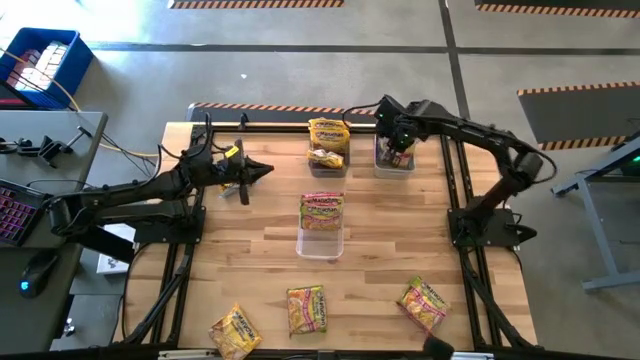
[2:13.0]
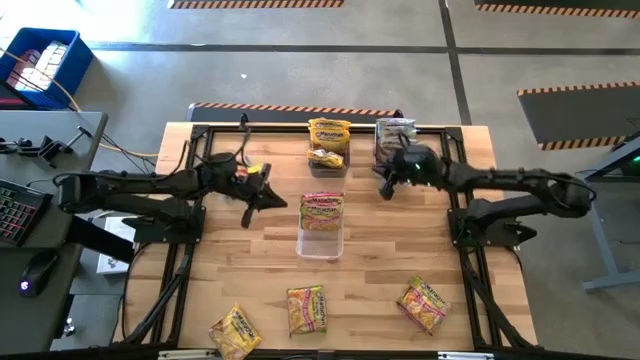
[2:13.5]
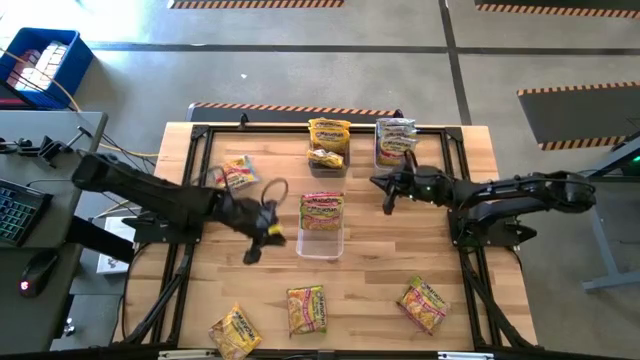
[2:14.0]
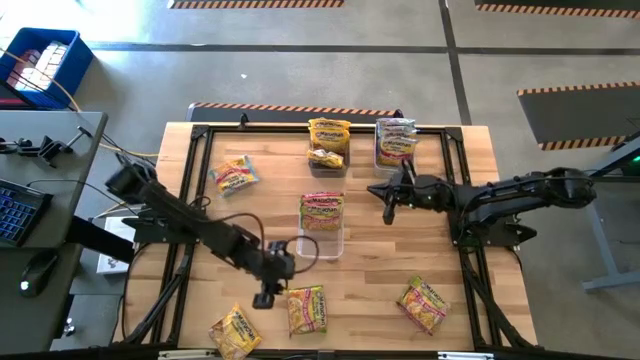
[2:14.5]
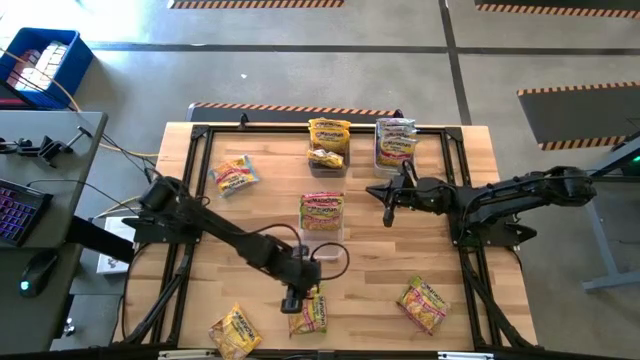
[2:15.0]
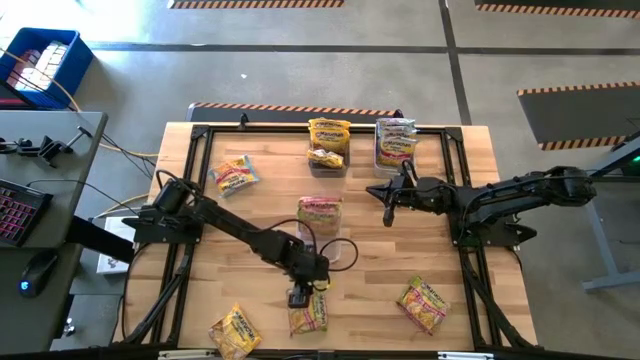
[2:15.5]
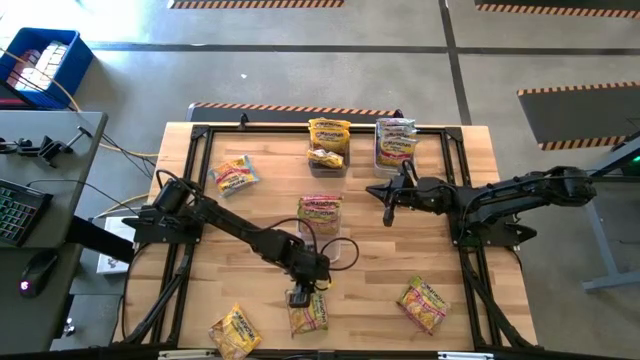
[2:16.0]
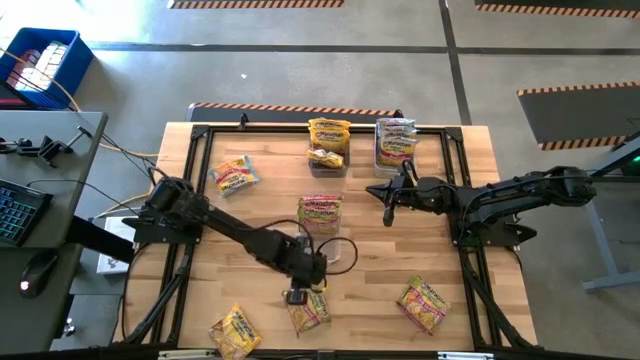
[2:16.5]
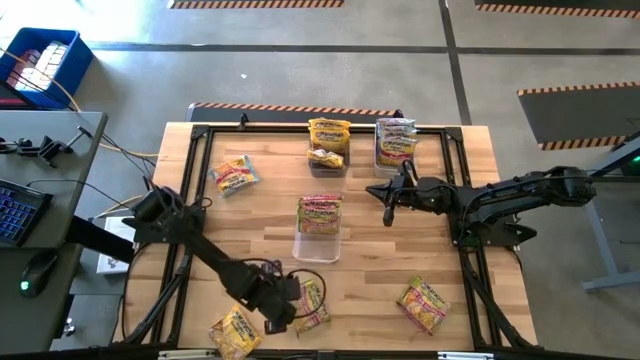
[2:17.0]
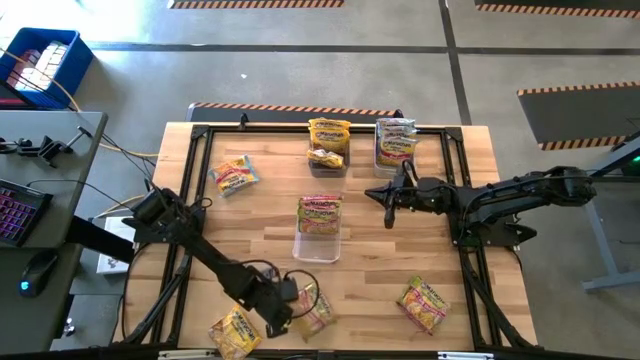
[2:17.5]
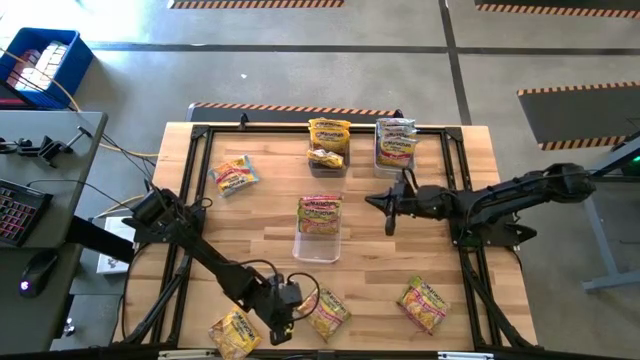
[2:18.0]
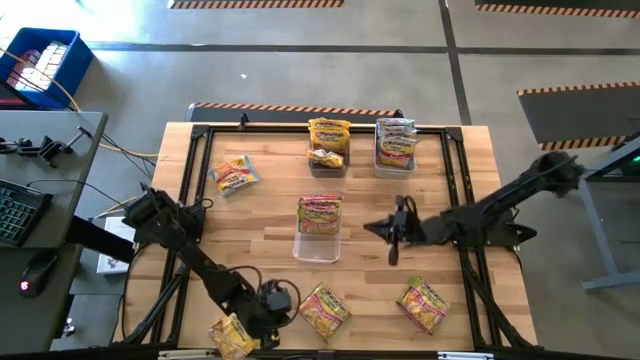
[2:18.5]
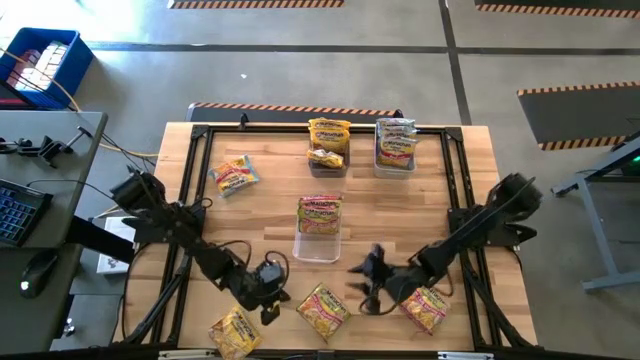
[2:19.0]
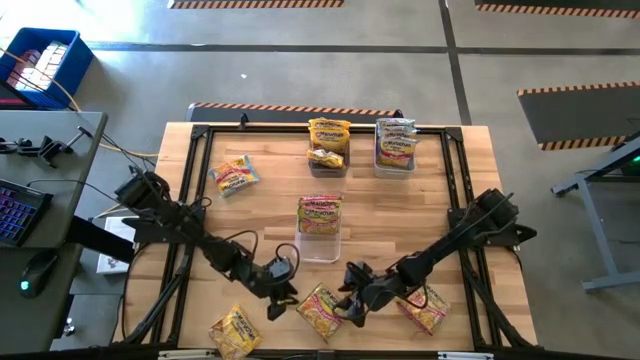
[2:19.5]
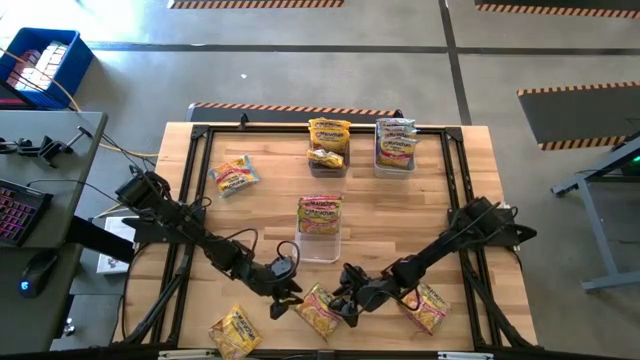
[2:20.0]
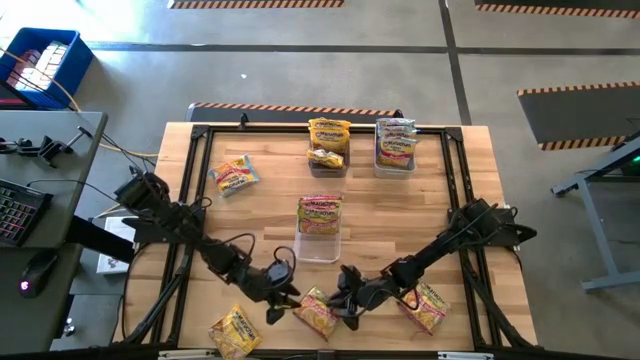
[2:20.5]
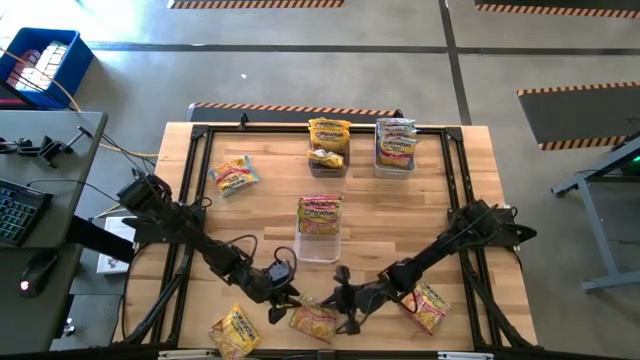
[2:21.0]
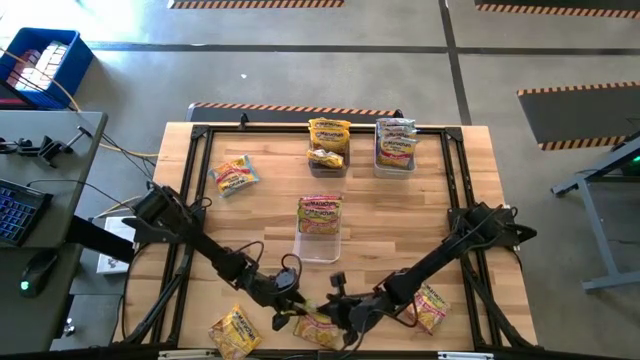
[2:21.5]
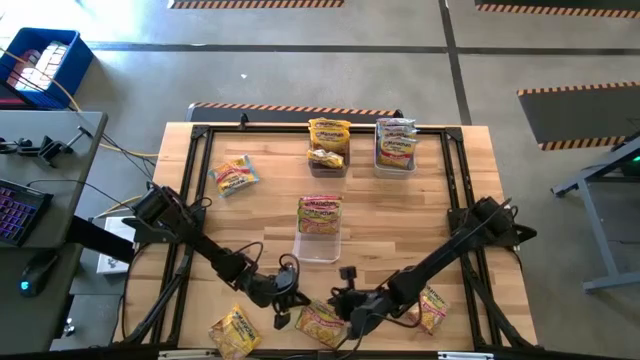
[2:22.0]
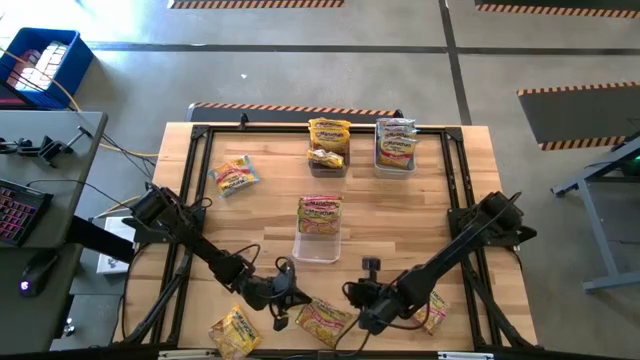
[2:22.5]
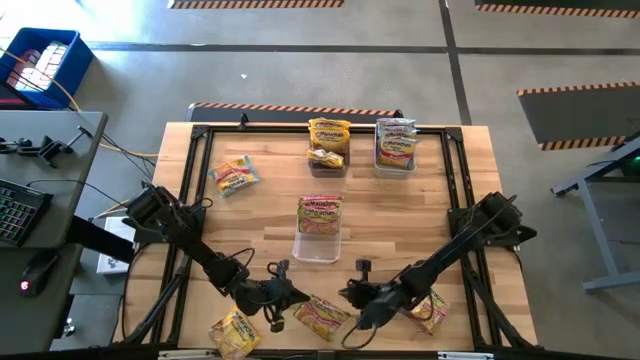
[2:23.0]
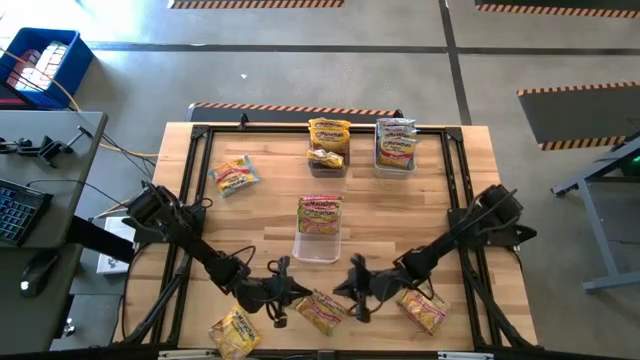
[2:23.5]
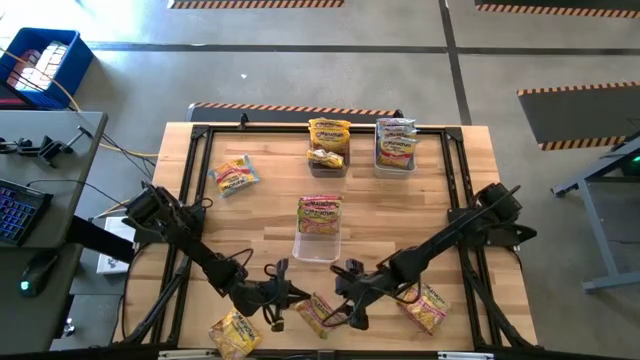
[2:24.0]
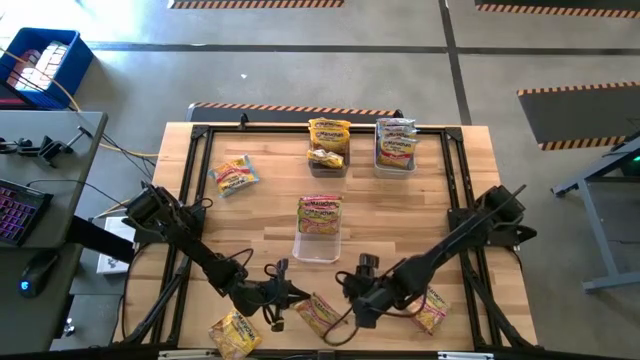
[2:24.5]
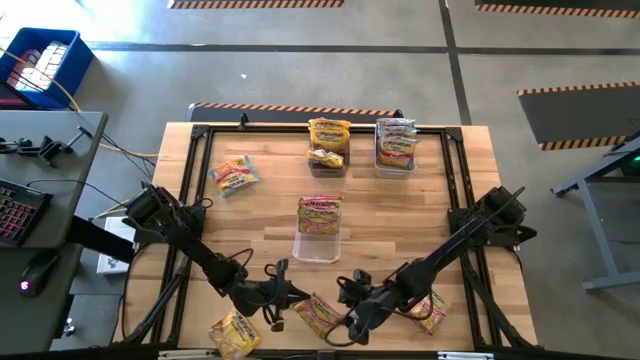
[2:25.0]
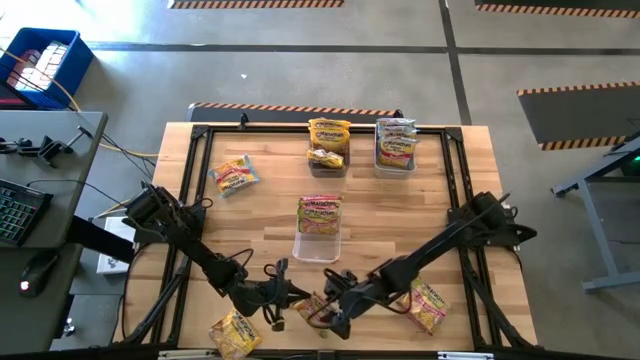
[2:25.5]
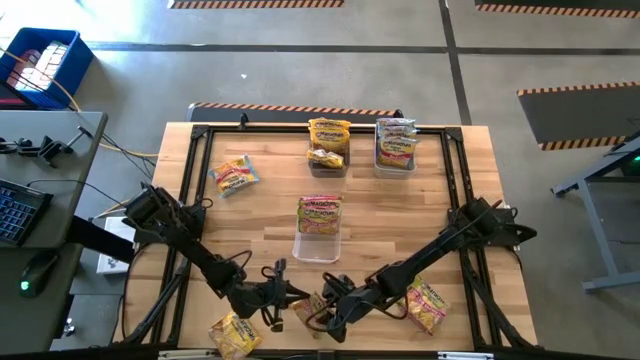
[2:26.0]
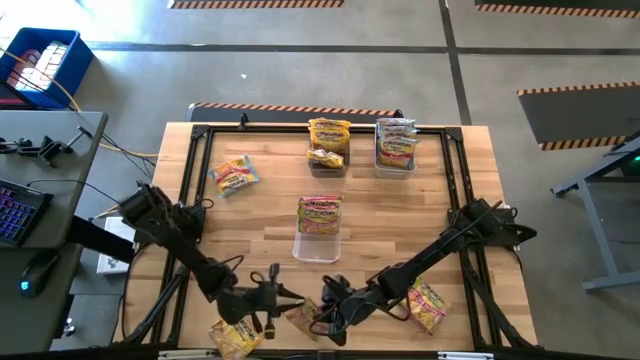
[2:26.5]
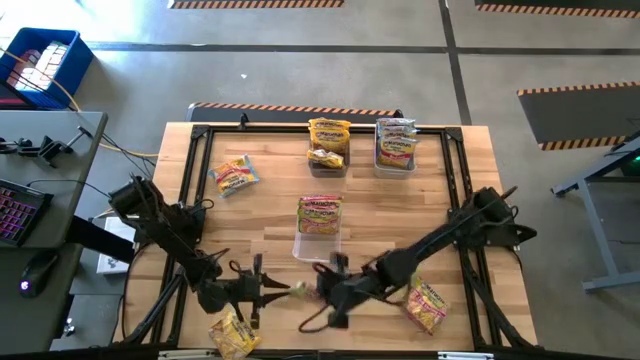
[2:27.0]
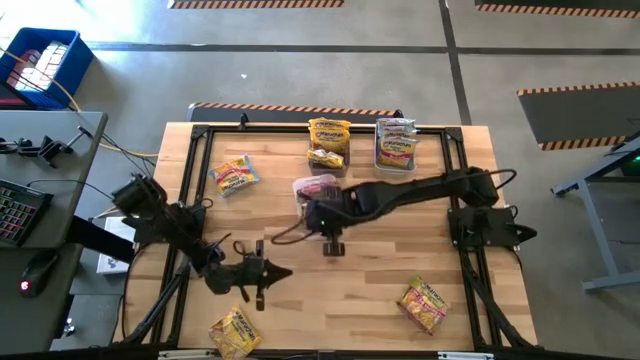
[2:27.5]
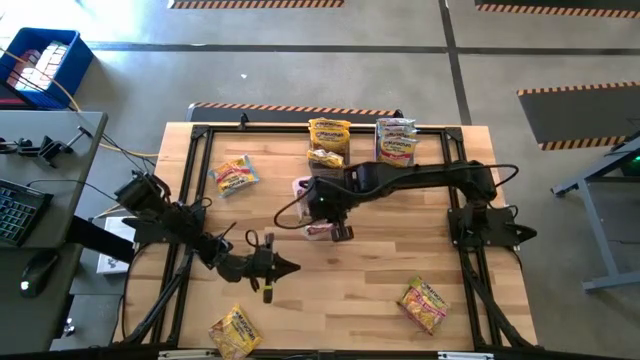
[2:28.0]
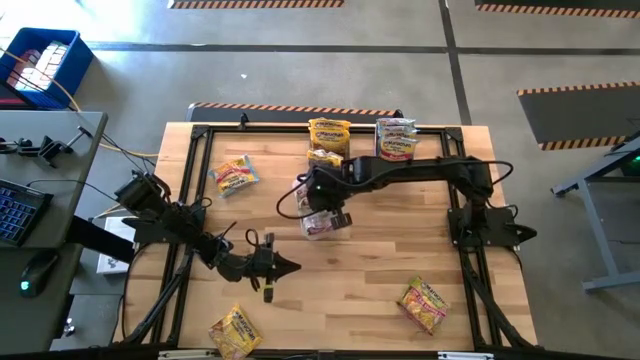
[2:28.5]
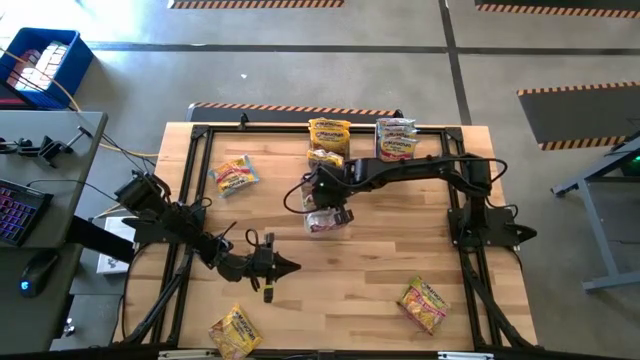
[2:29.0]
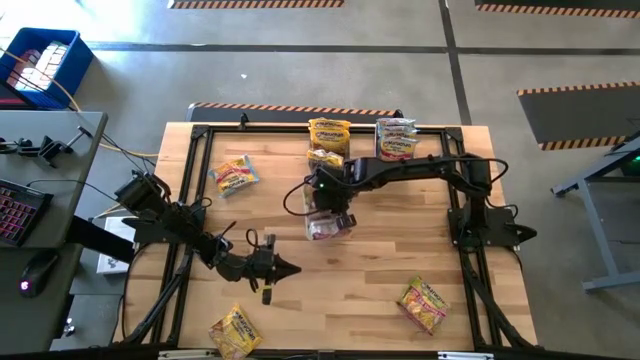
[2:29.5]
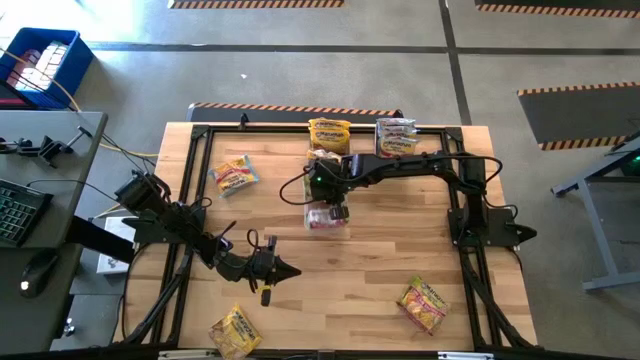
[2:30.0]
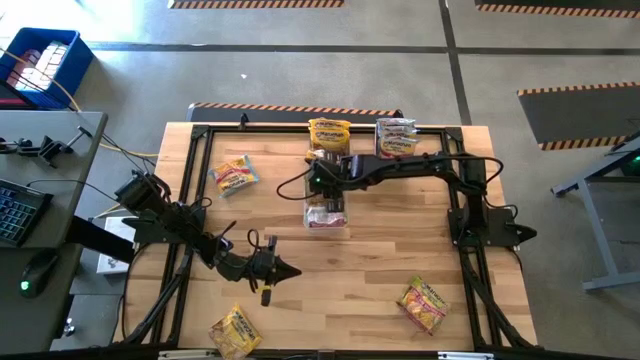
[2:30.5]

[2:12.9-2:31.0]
Task: Sort Maruchan noodles
Put the green noodle pack into the transparent bin

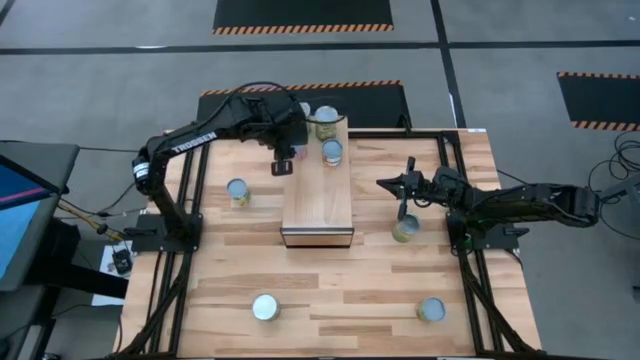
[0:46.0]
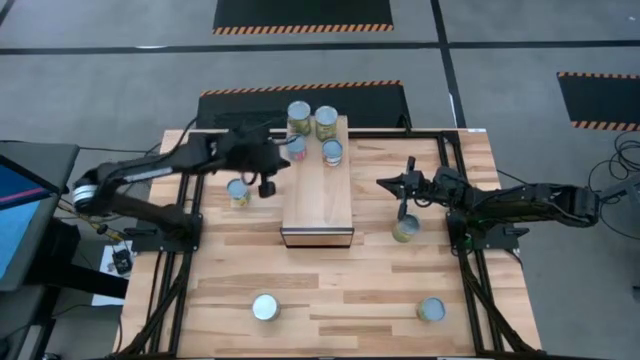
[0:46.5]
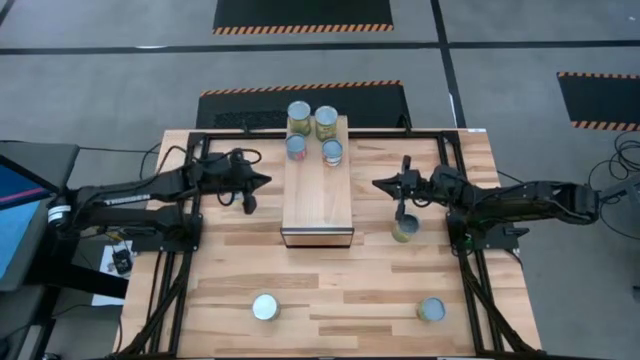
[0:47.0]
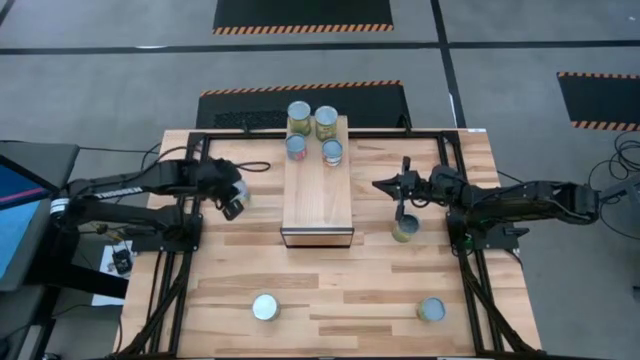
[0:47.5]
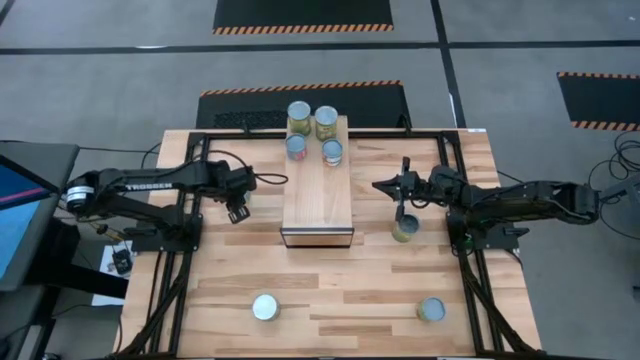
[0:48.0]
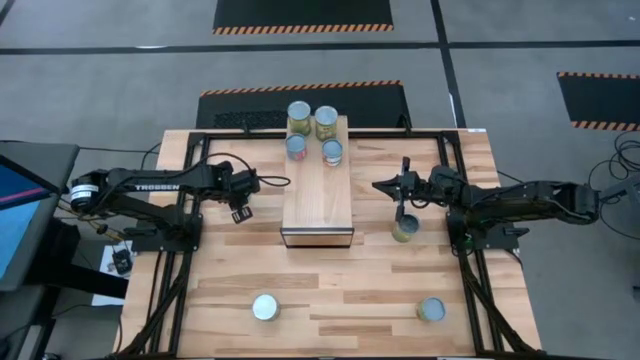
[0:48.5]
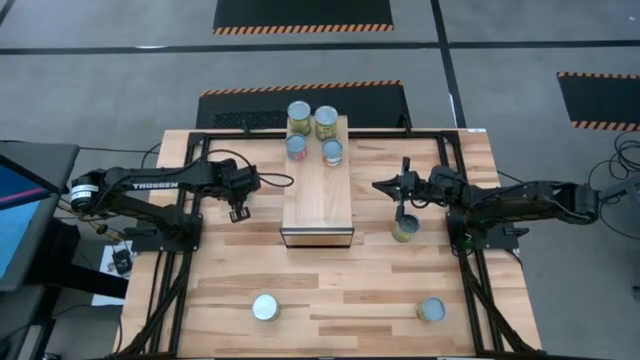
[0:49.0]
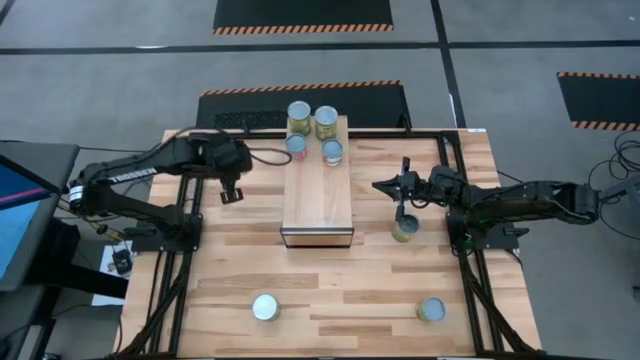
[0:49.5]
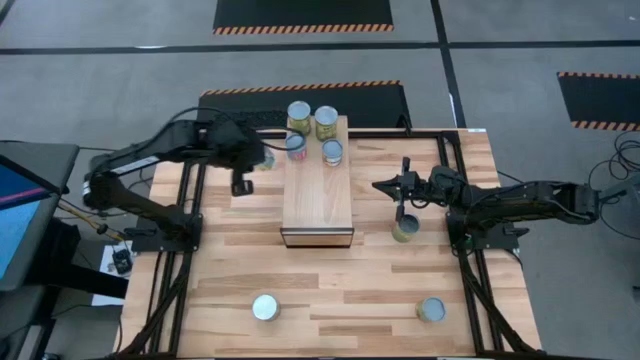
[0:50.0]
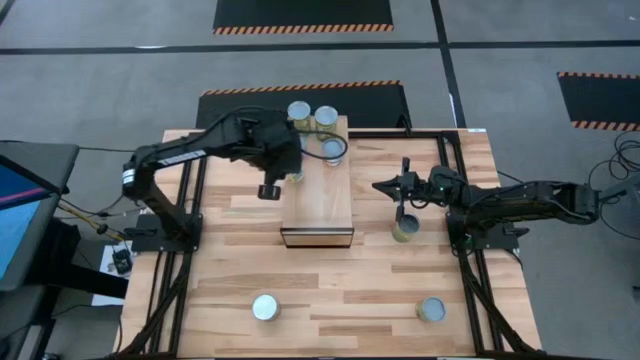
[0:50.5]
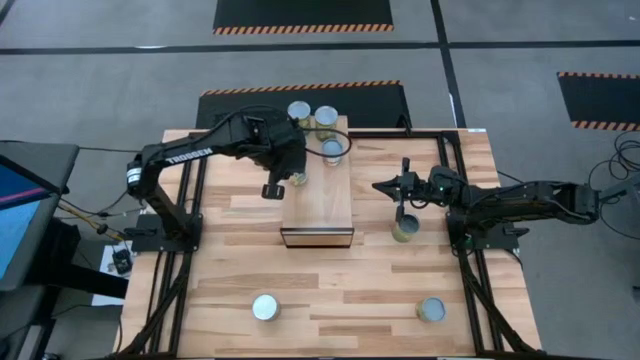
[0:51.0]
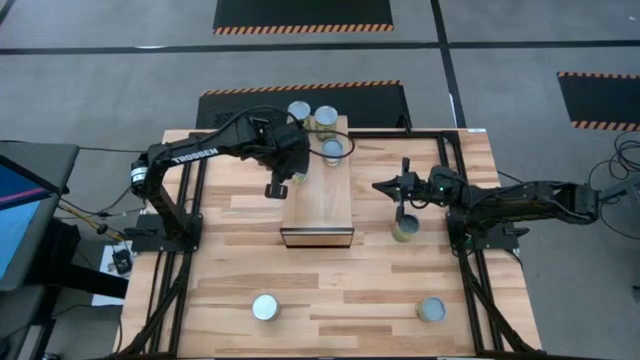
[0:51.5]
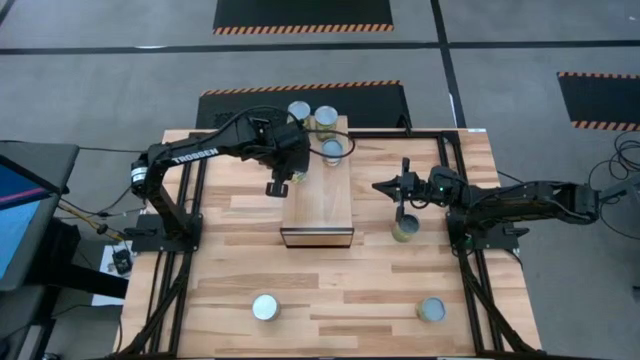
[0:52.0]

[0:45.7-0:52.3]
Task: Pick and place cans onto a shelf
Put the canned mixed fruit on the shelf
